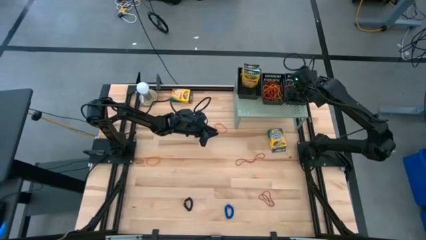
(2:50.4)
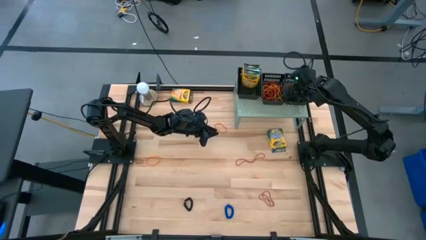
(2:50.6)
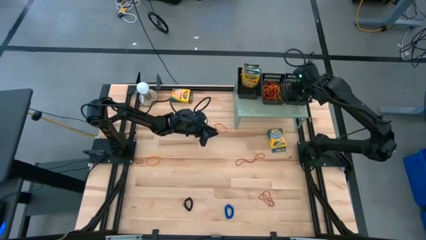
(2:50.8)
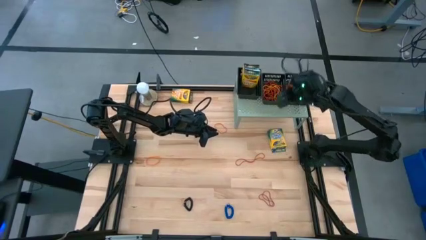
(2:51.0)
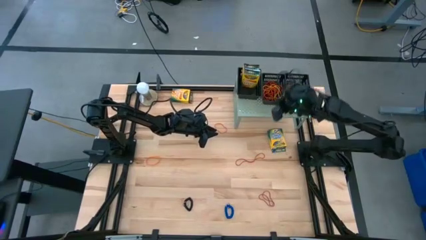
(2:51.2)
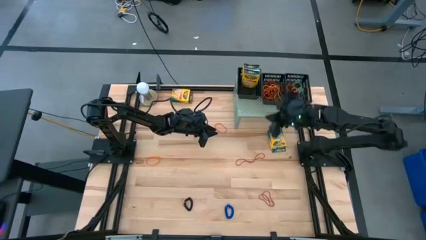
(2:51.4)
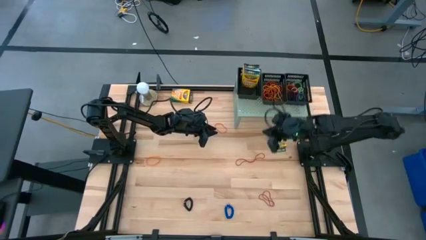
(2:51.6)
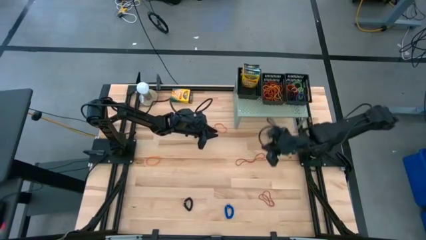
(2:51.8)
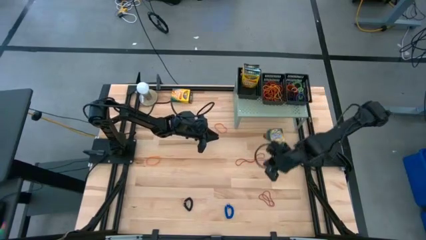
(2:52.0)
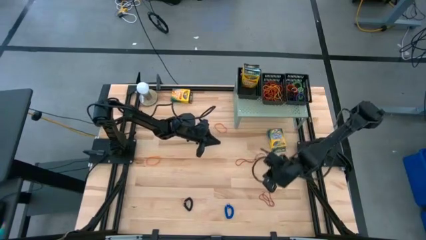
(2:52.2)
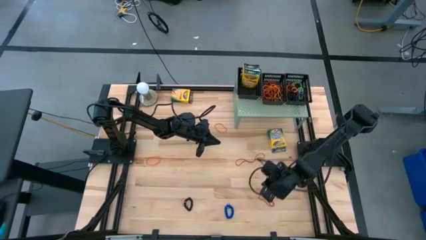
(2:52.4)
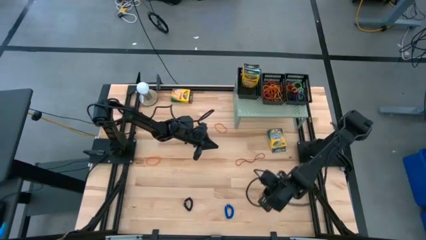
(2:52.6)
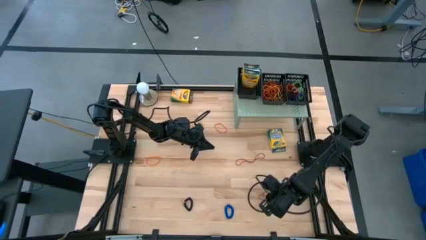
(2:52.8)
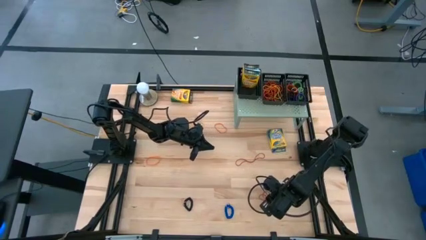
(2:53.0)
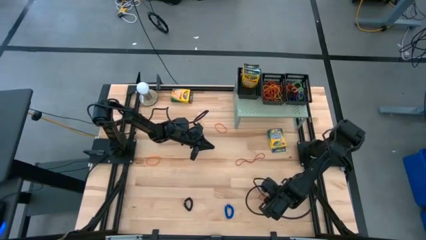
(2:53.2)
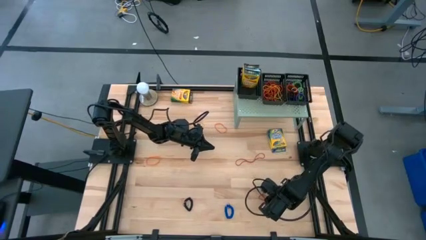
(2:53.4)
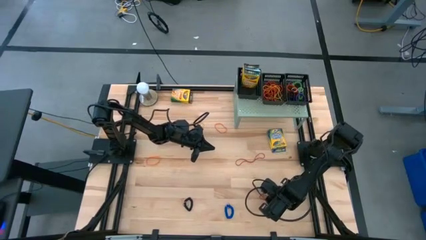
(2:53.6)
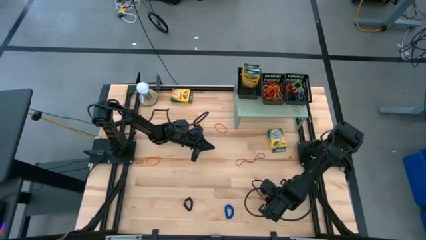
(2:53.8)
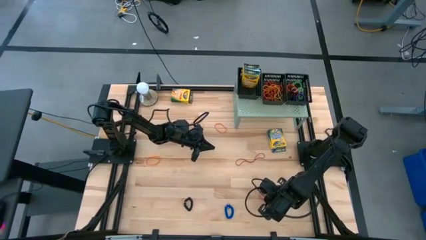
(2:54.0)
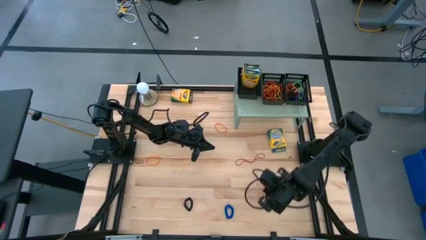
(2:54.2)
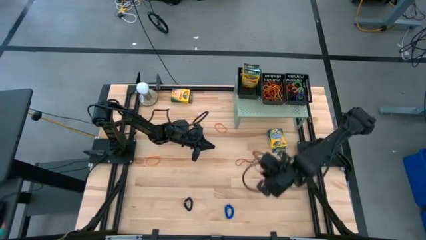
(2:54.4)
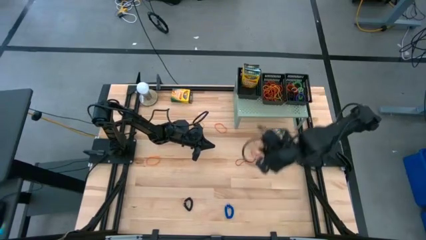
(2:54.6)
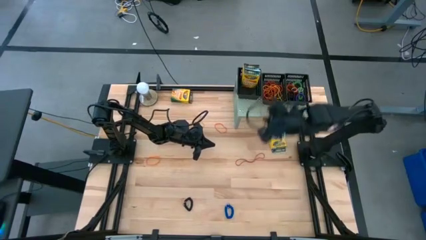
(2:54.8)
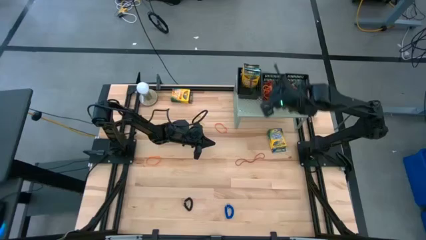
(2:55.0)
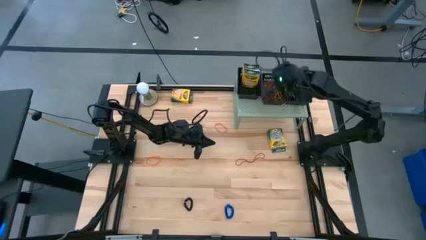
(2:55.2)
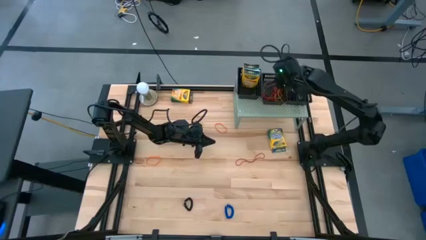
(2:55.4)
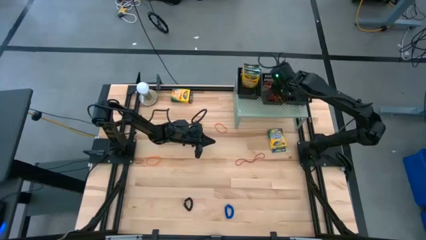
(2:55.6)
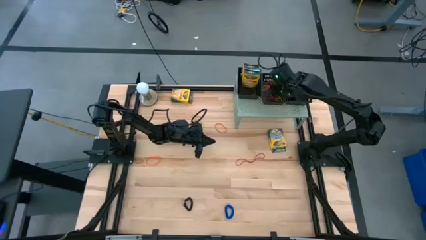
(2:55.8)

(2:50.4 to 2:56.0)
Task: Pick & Place Office Desk Supplies
Put the bottom red rubber band into the middle black basket on the shelf

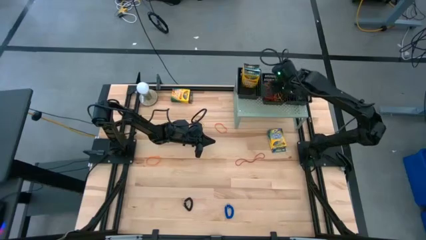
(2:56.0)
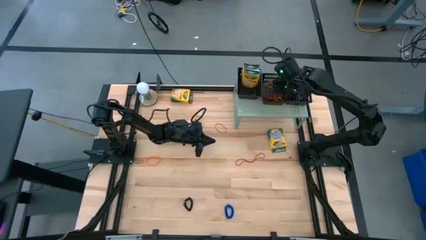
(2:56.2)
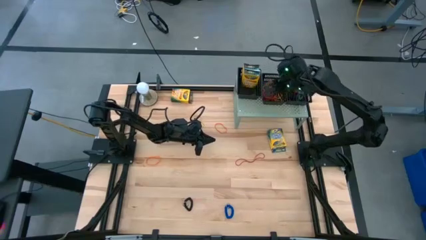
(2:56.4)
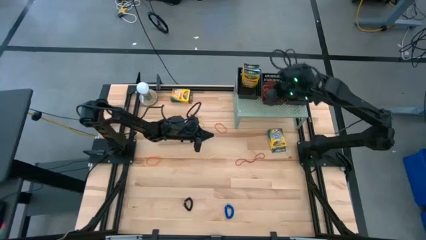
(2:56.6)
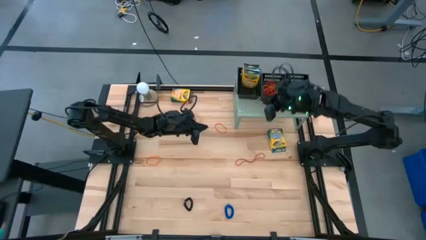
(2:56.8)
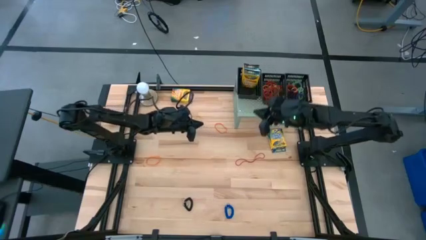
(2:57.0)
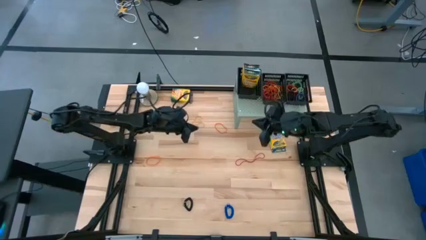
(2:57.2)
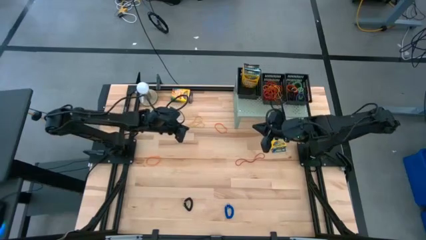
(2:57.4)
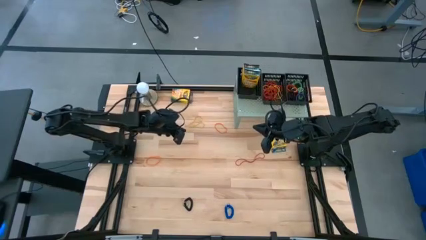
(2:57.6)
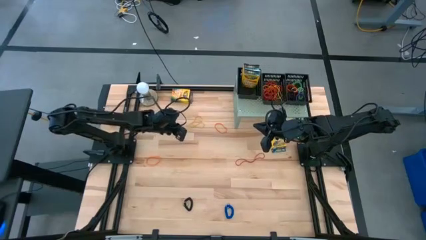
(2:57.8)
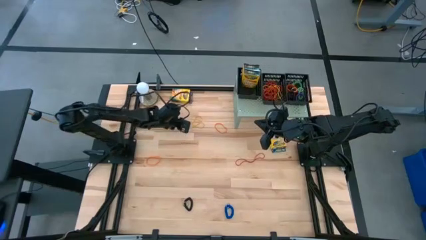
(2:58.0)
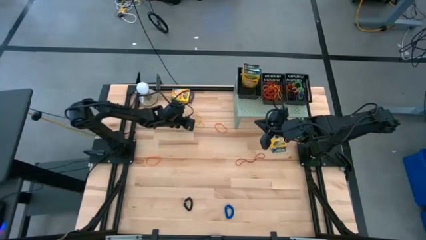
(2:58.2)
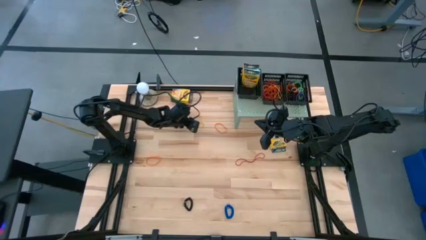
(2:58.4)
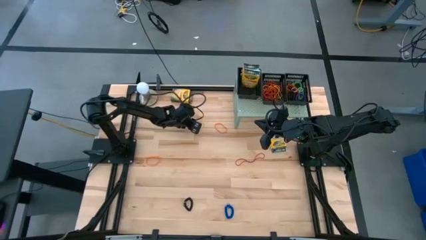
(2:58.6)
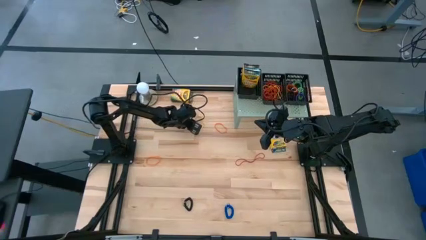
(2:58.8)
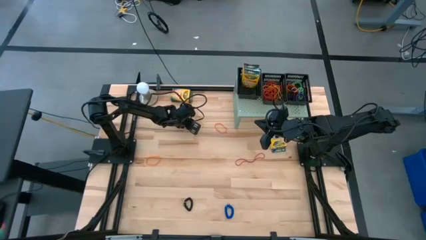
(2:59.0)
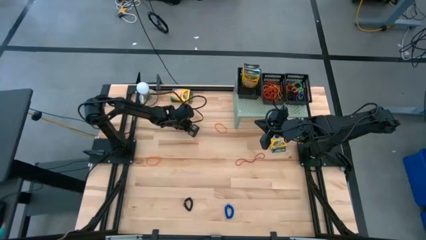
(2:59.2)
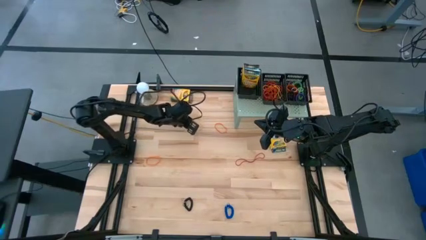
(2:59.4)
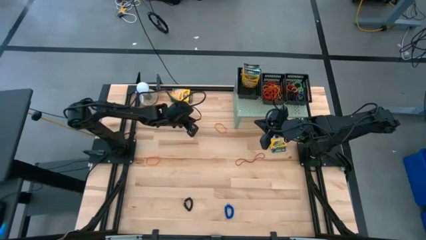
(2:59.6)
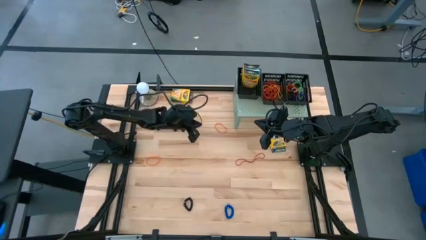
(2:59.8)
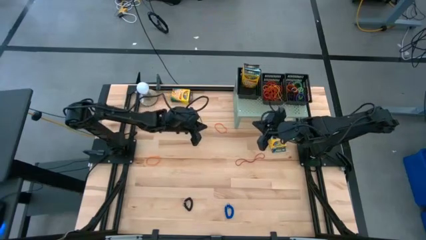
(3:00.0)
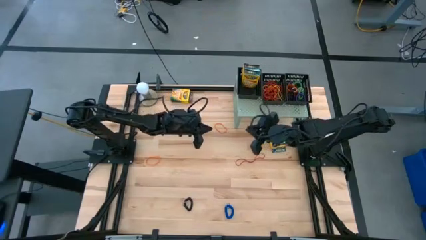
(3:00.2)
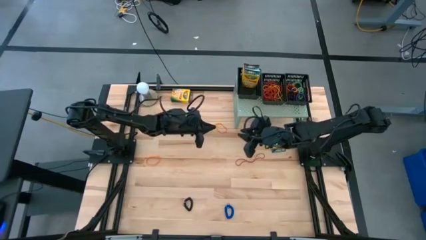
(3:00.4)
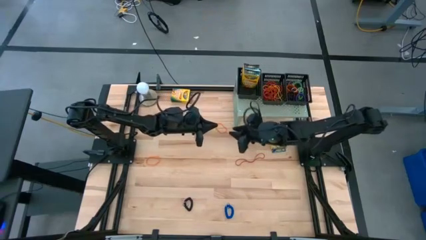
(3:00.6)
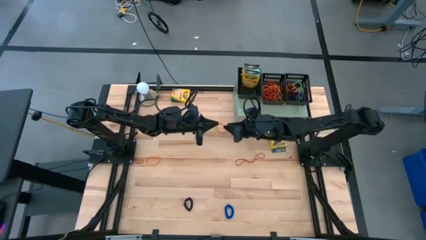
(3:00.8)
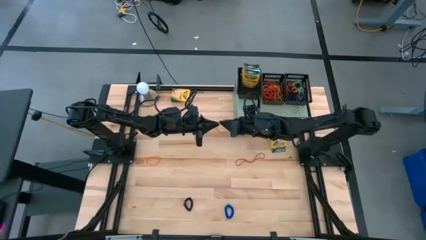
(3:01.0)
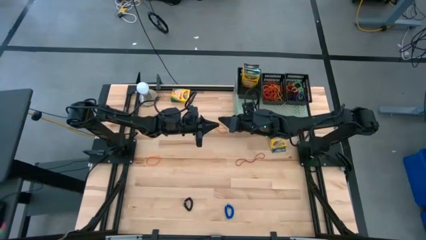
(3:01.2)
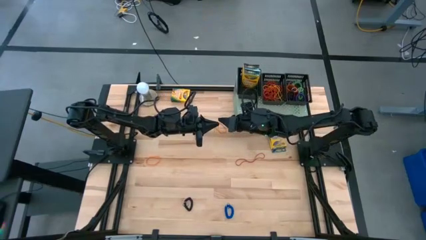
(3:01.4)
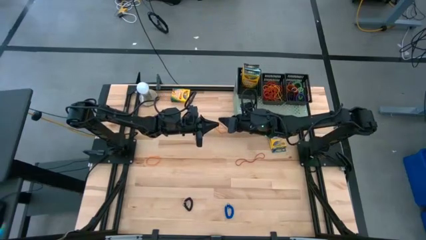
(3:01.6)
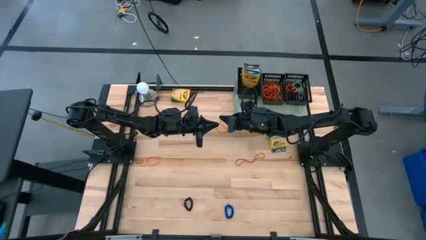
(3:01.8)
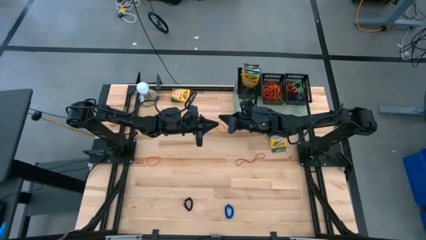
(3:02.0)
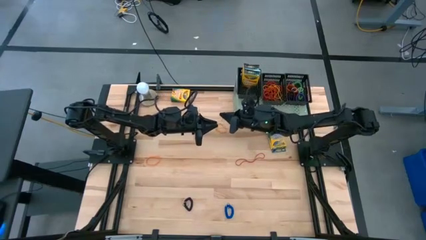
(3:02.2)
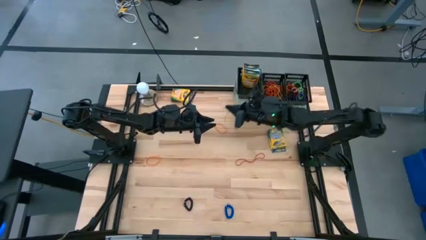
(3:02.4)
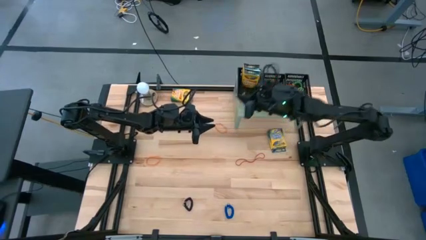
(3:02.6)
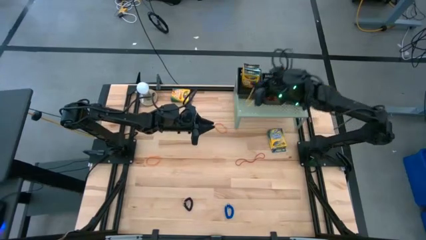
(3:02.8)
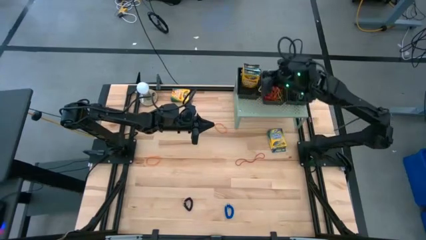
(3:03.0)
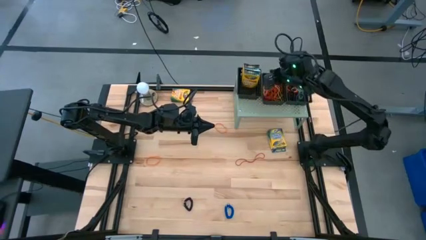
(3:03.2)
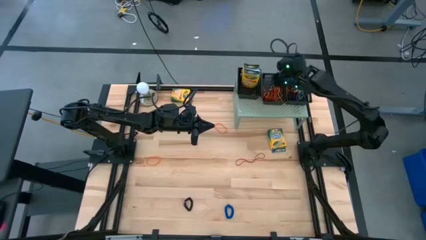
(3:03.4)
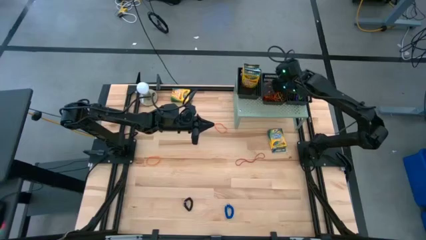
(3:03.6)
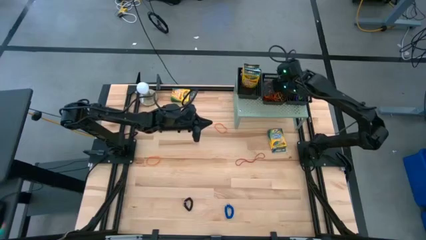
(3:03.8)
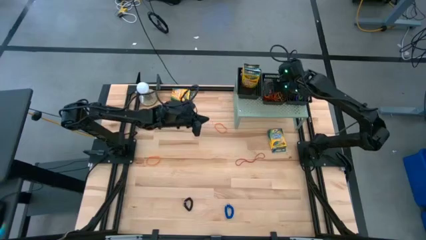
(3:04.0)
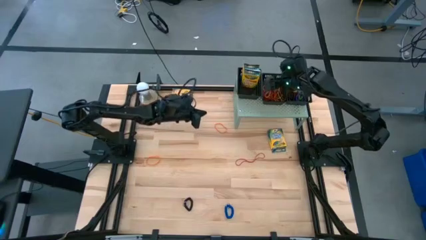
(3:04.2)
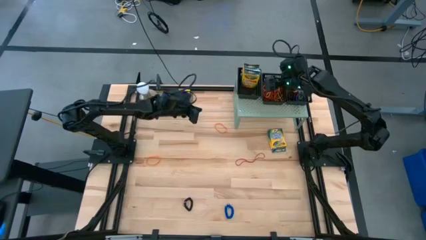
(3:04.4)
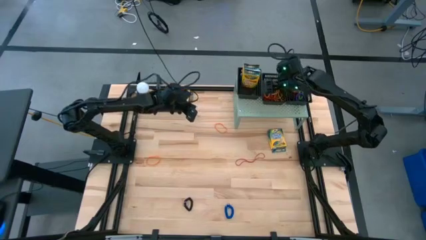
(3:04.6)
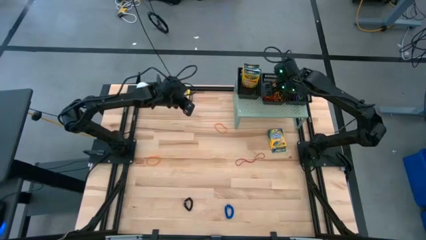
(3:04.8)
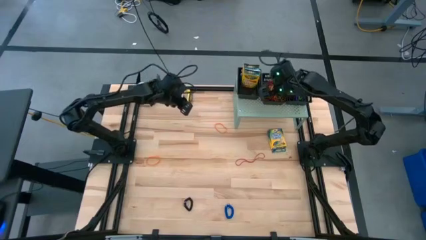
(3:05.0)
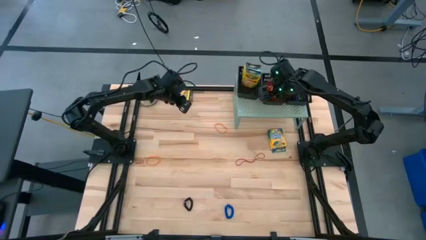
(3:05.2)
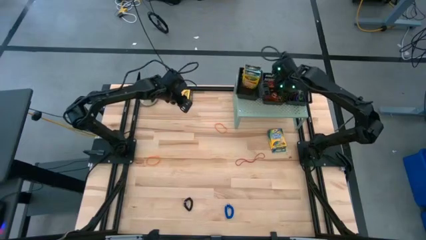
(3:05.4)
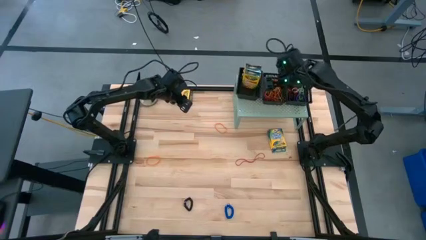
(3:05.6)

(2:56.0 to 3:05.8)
Put the yellow rubber band into the middle black basket on the shelf

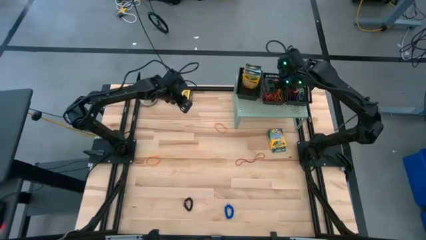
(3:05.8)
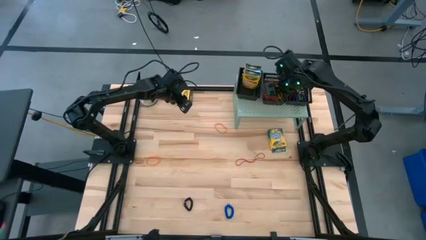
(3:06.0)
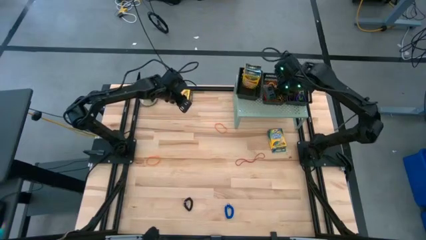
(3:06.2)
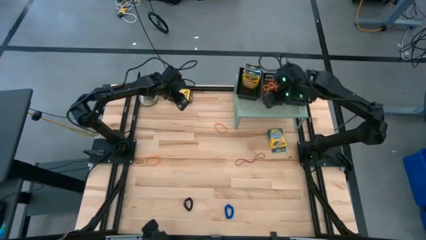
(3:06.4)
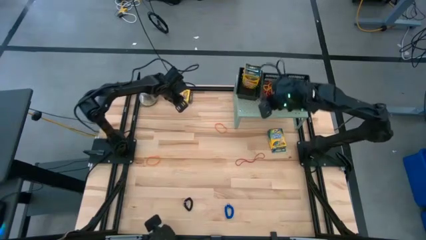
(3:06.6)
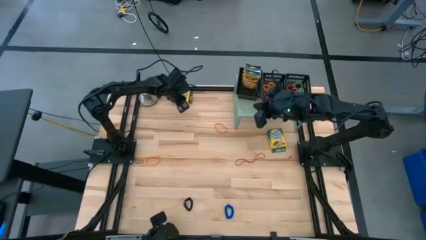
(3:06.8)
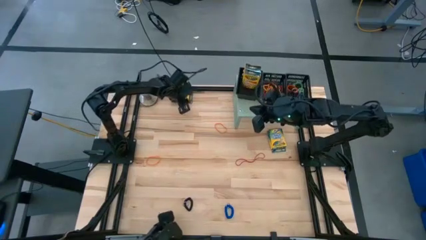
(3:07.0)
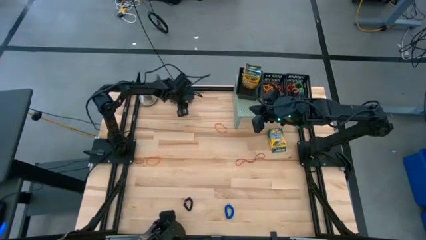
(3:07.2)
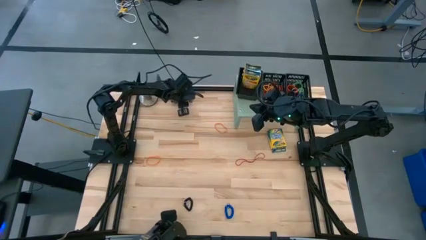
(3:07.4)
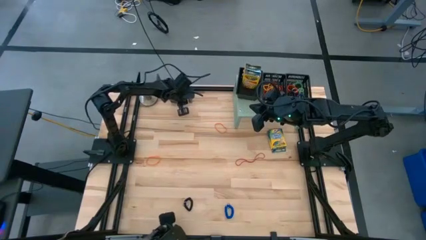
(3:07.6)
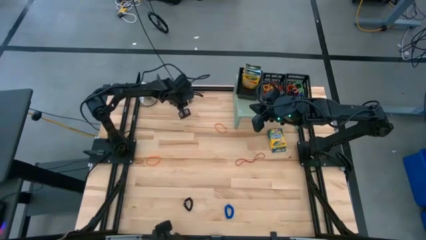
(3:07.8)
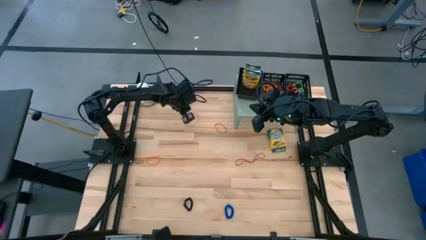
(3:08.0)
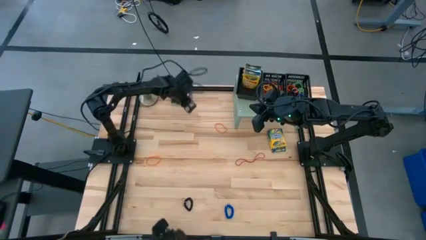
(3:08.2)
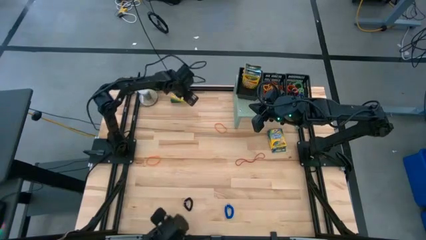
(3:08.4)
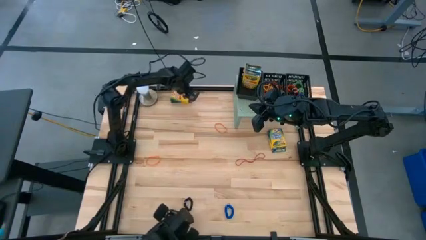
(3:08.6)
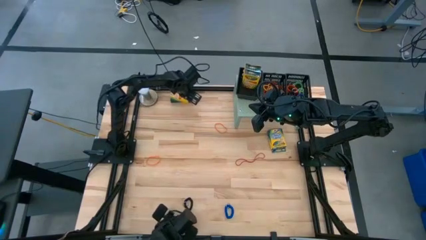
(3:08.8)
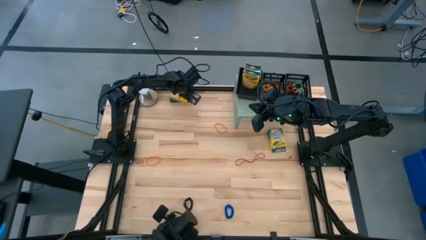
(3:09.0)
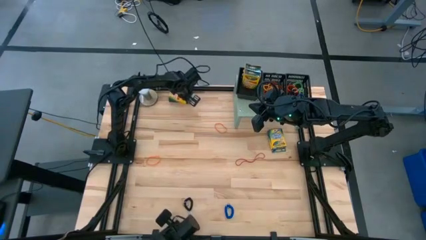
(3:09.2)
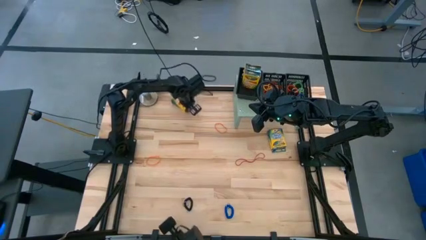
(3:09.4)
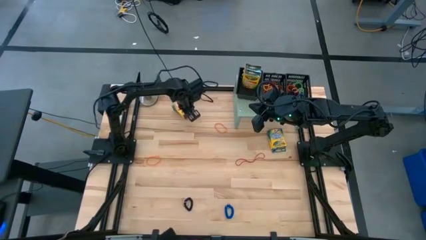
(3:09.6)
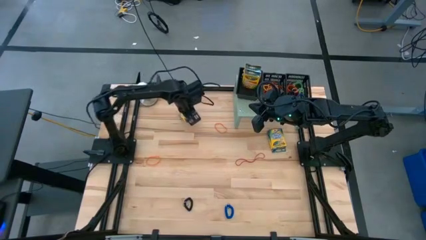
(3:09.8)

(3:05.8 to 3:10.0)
Put the top yellow crayon box into the left black basket on the shelf
